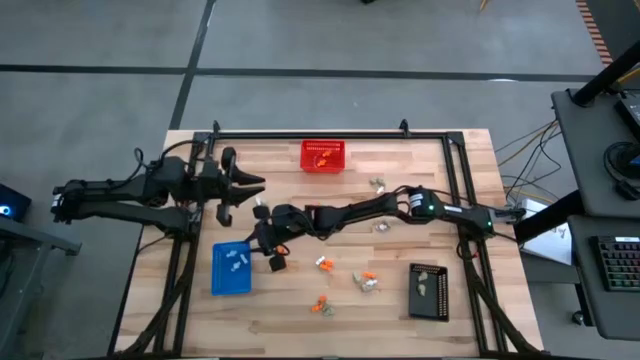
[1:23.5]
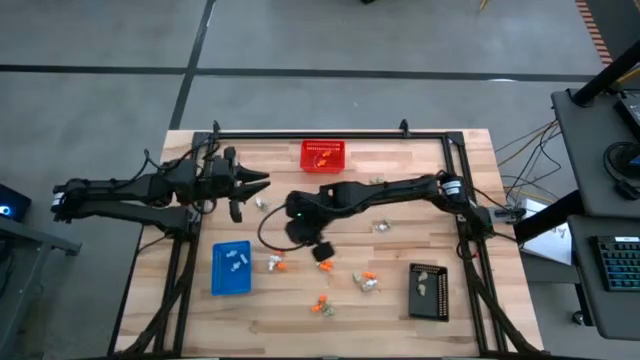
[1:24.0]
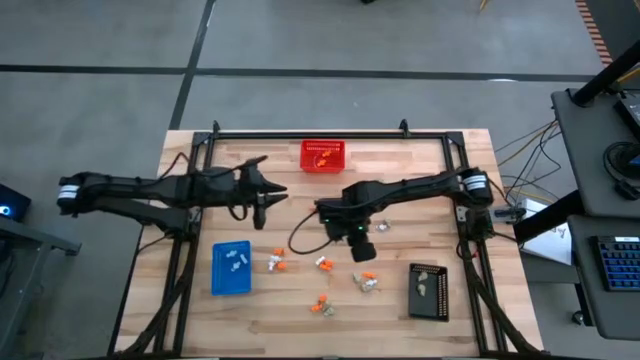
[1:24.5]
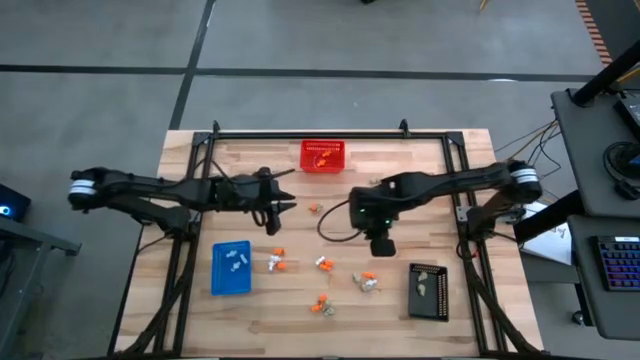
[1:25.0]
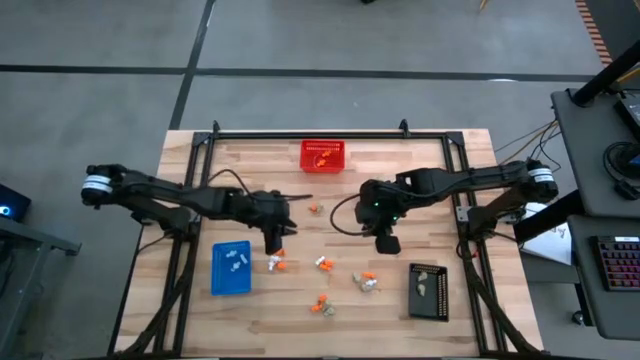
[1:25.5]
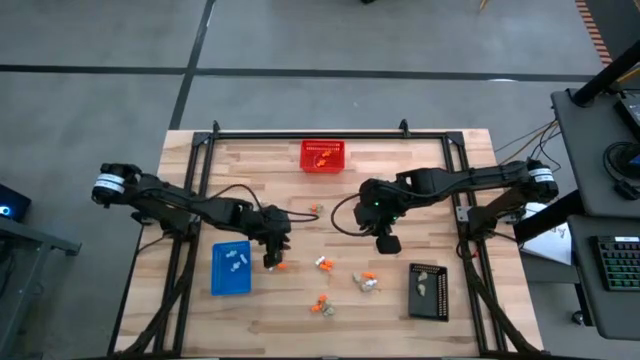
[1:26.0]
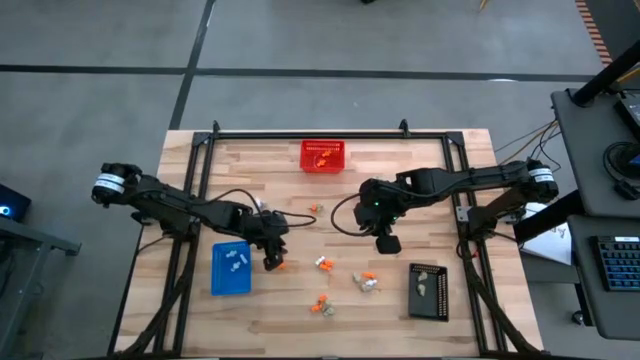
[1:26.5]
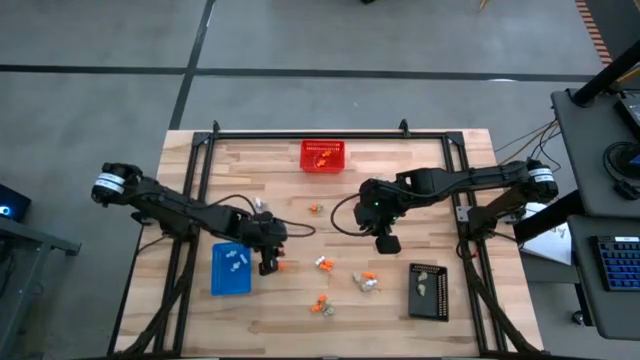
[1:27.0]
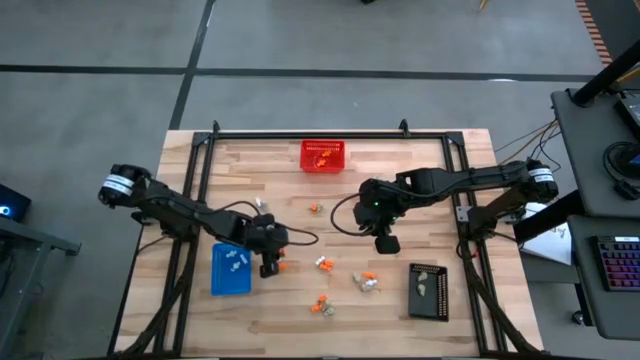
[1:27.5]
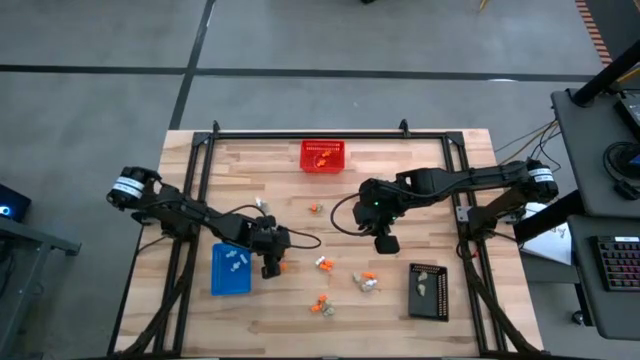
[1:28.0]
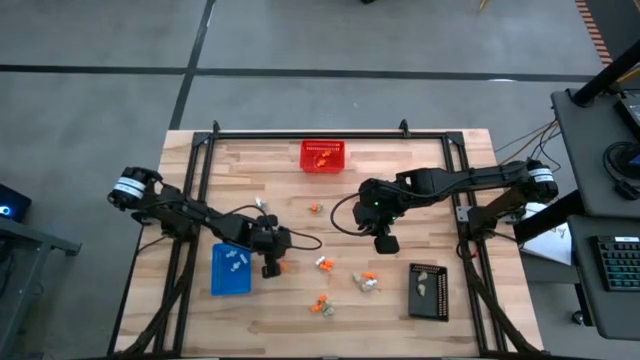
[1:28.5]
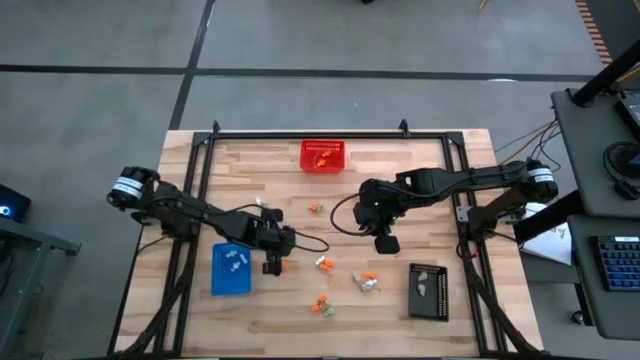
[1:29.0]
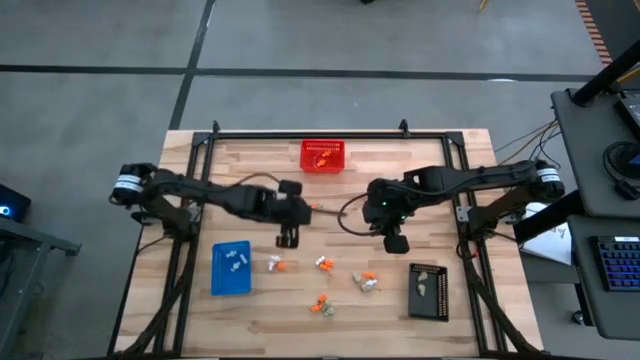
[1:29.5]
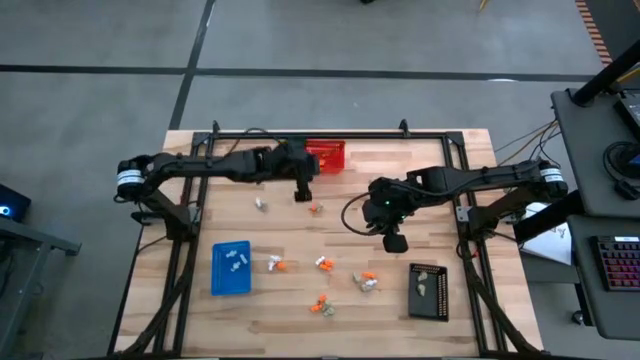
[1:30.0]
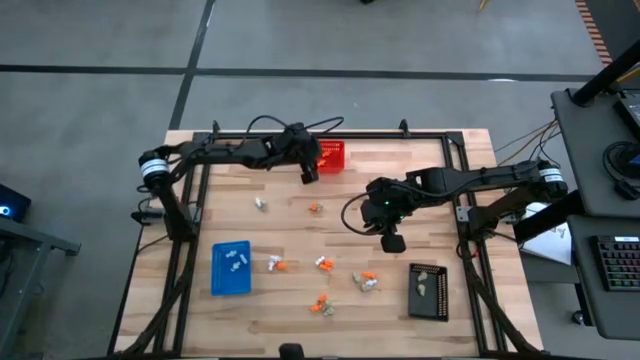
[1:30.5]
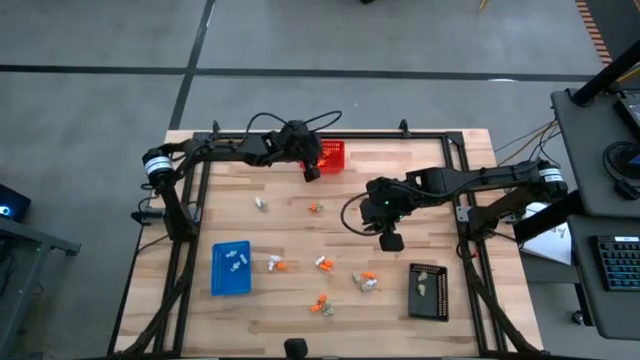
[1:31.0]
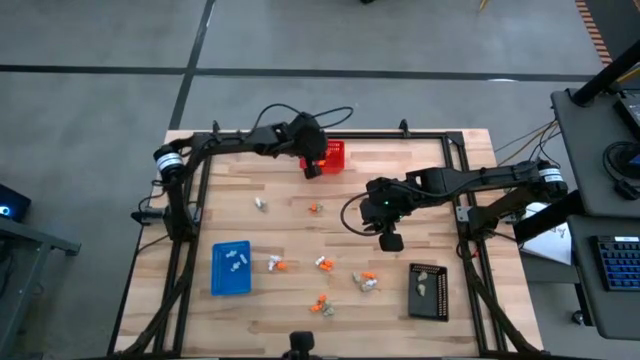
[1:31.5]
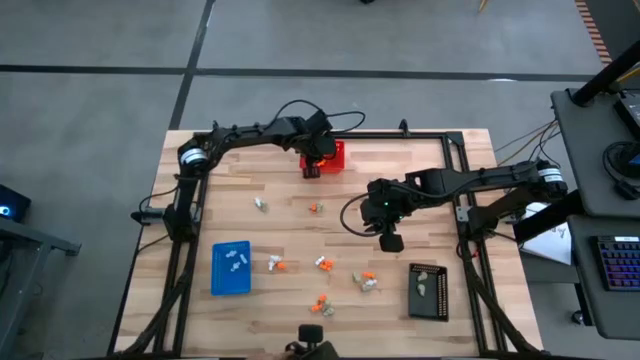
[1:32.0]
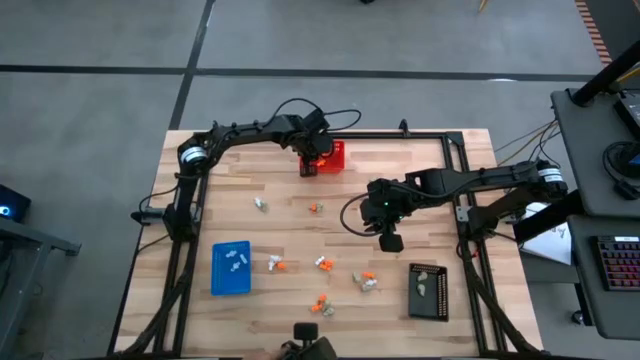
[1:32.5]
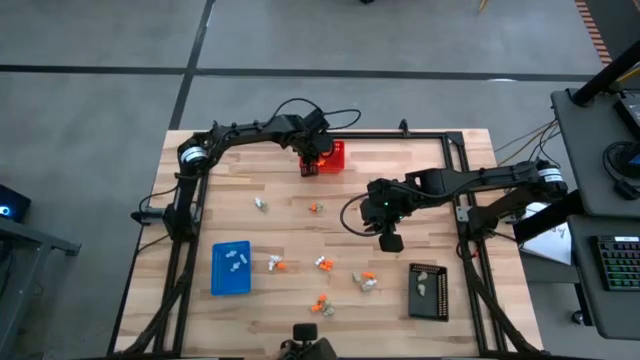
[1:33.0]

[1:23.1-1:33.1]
Task: Sort Halloween decoration
Put the orange skeleton toy into the red bin

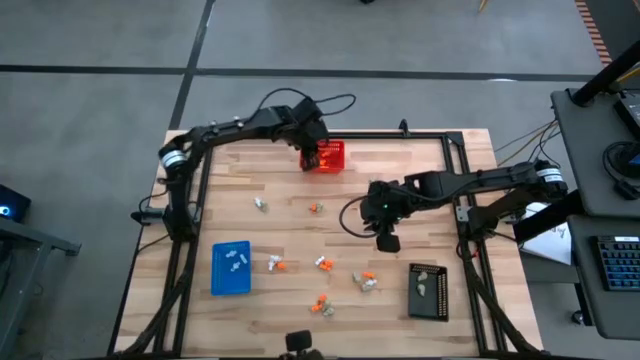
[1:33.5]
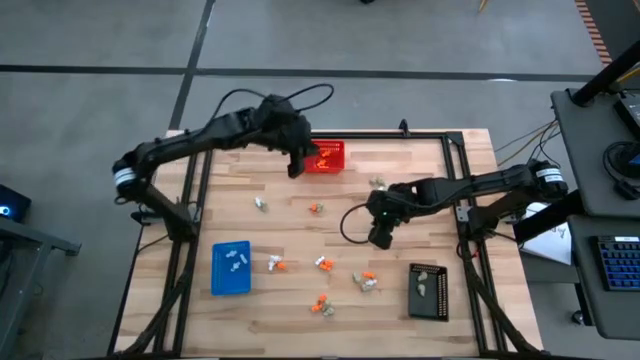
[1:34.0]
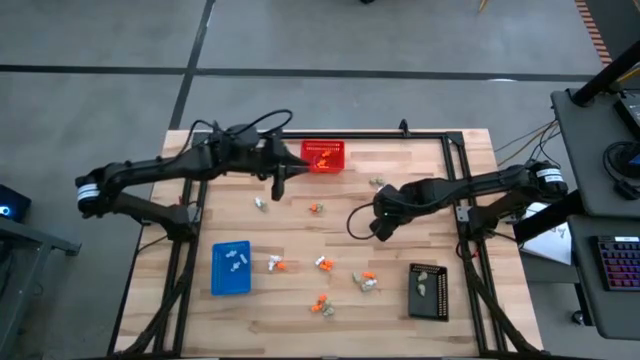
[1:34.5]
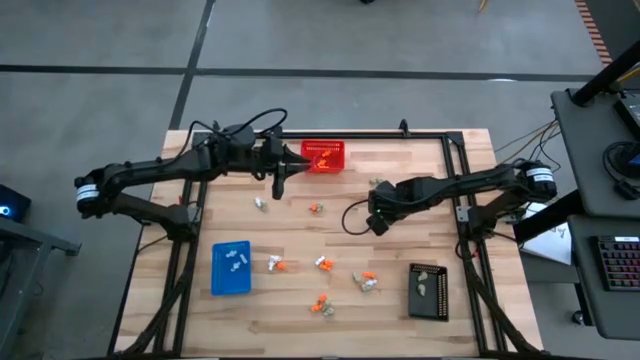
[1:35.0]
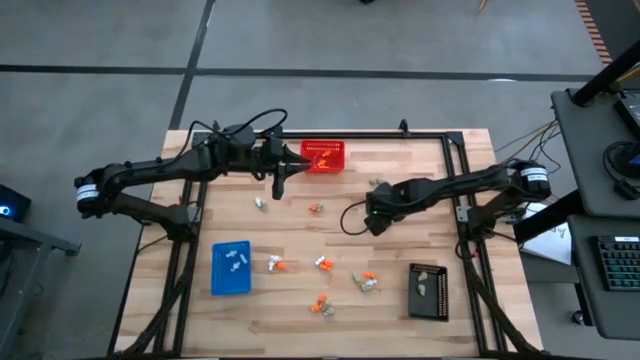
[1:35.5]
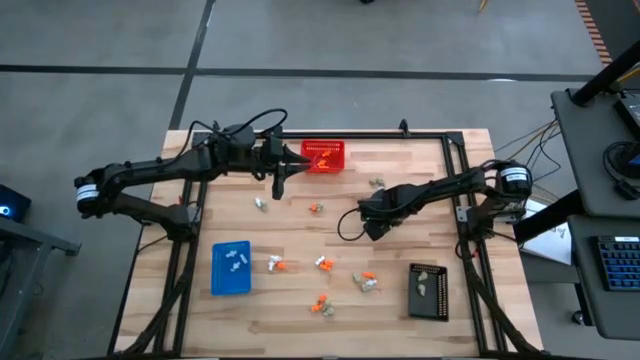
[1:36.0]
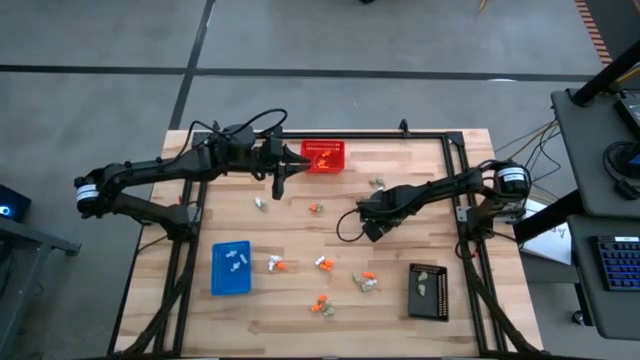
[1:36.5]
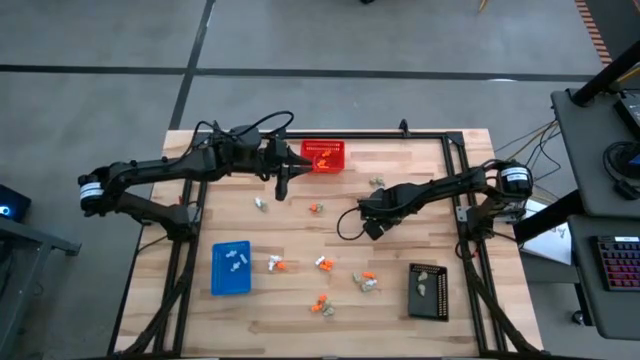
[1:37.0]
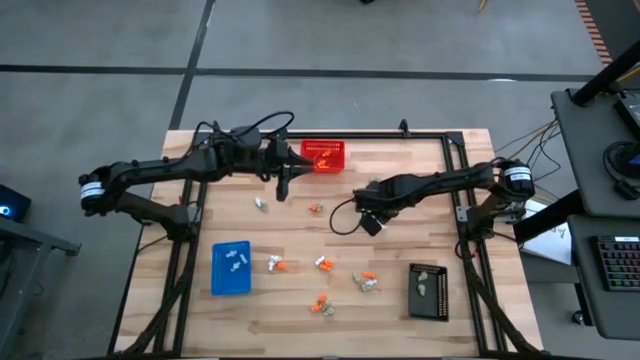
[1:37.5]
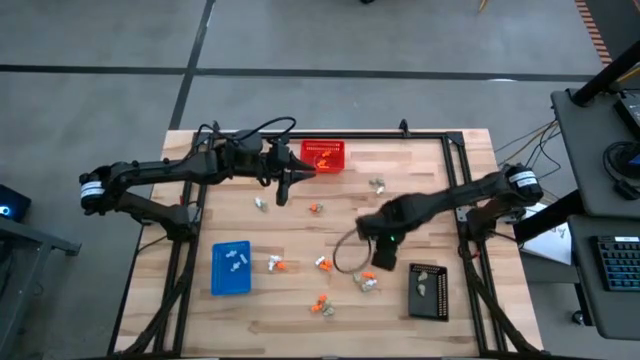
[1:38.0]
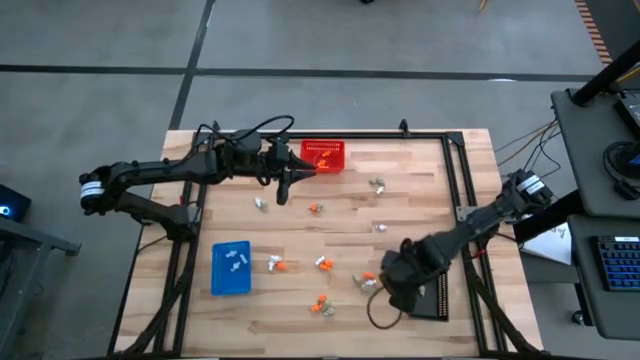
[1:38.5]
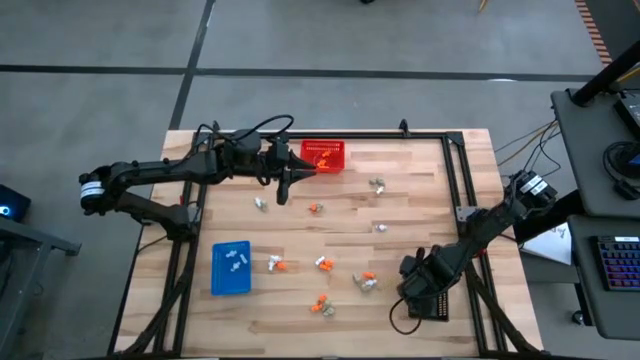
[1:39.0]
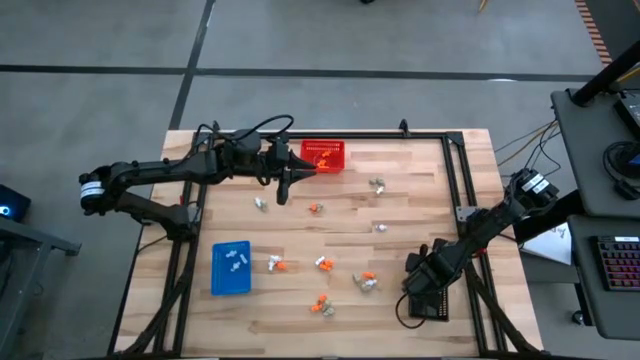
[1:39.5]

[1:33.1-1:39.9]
Put the gray skull toy into the black bin

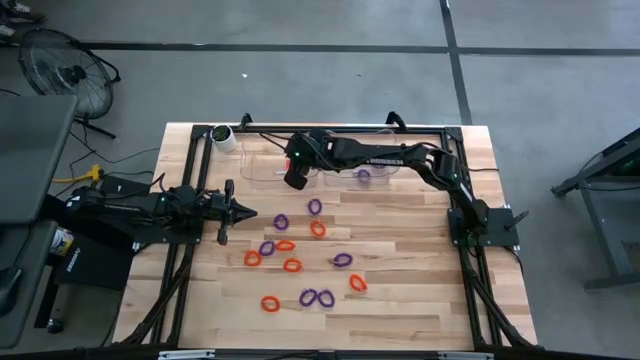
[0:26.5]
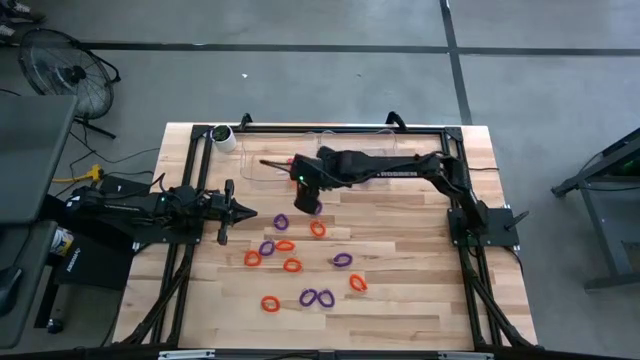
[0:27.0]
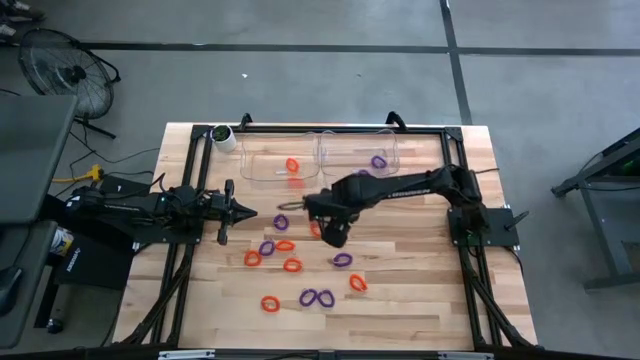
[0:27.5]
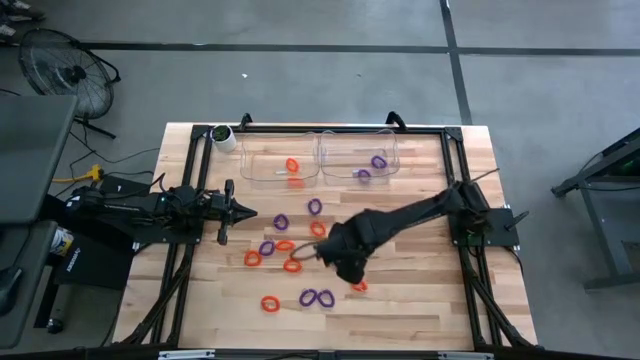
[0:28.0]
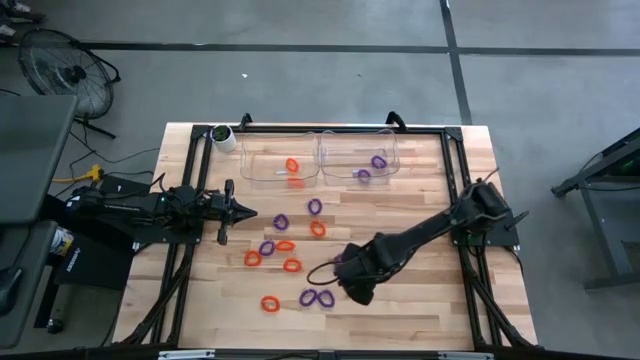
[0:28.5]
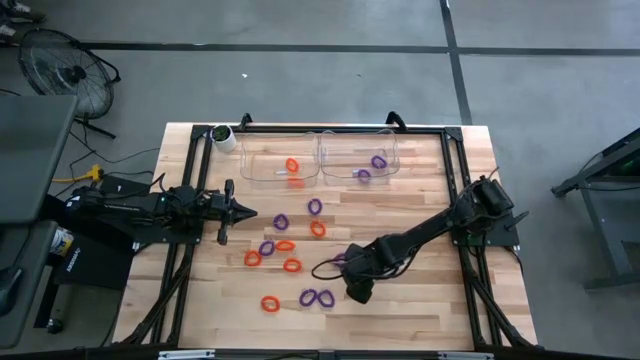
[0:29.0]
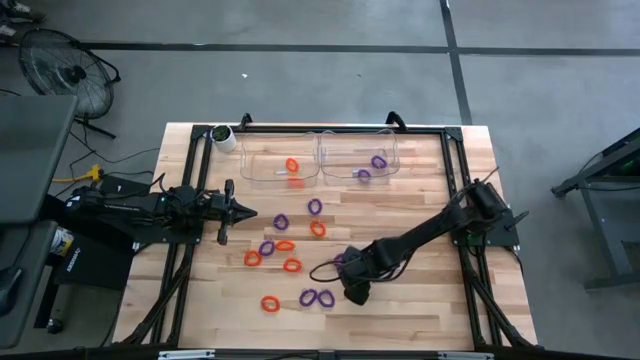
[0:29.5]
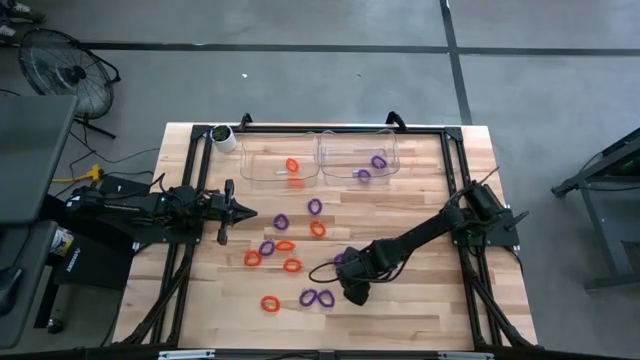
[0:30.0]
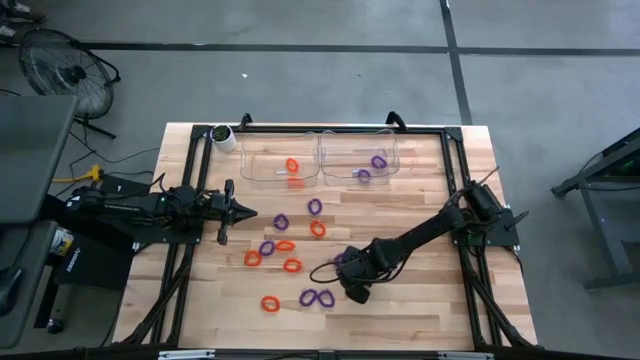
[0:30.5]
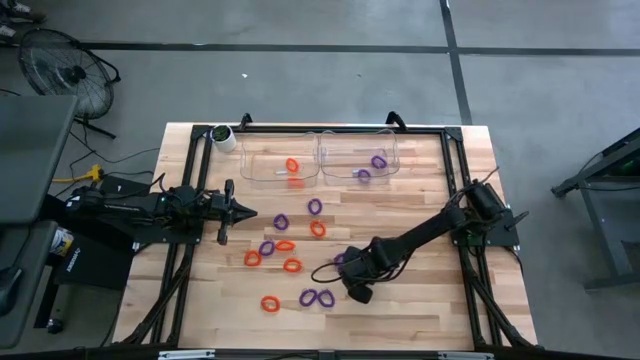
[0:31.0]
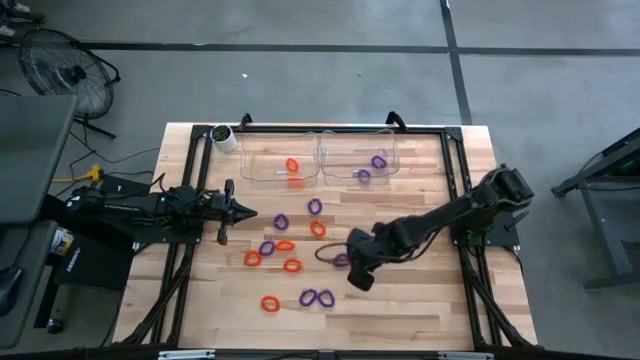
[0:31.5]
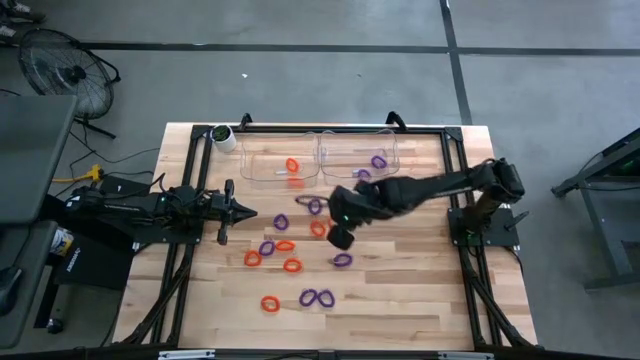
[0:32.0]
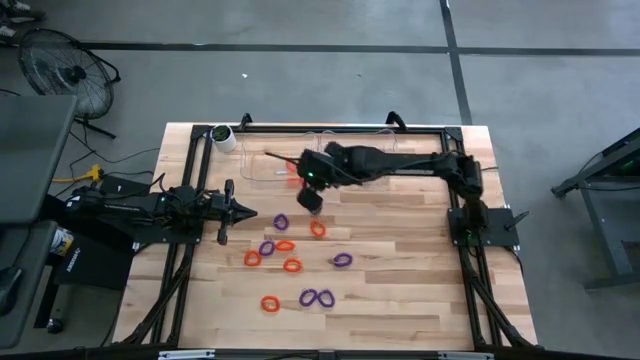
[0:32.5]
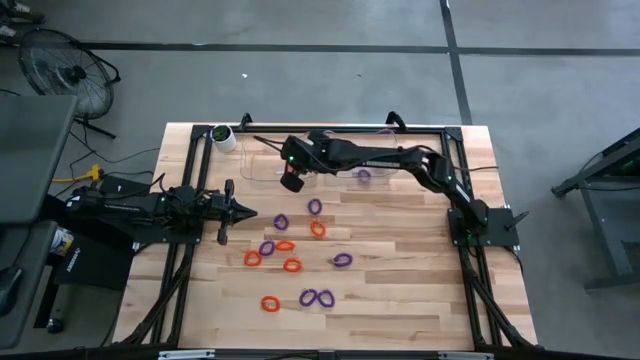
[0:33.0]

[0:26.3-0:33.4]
Task: Sort spring keychains
Put the orange spring keychain into the left bin
